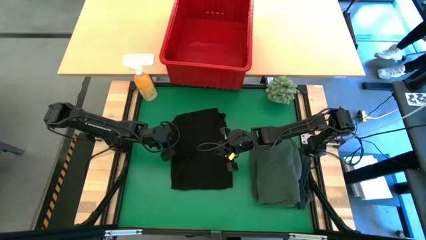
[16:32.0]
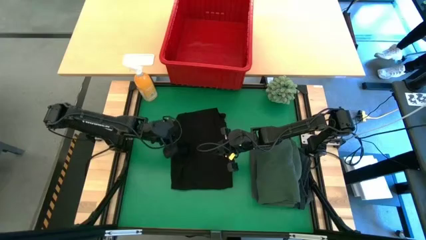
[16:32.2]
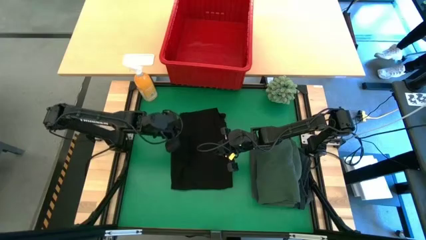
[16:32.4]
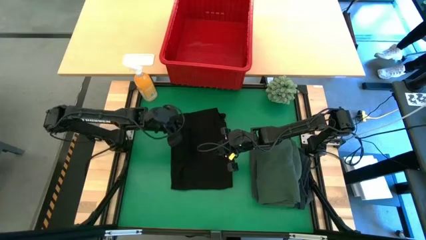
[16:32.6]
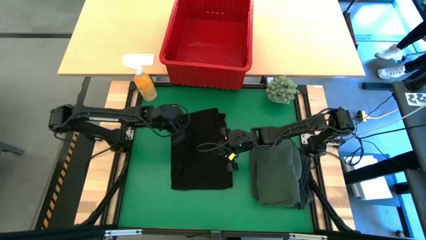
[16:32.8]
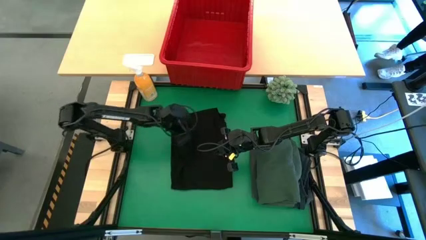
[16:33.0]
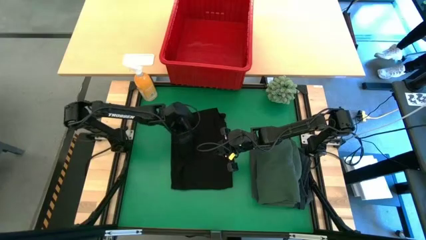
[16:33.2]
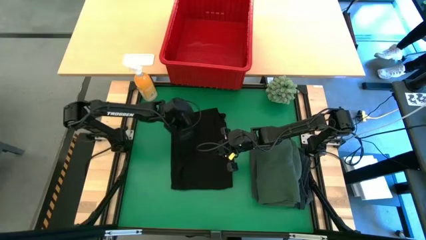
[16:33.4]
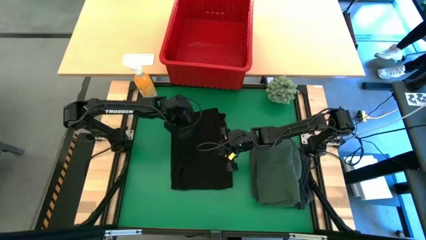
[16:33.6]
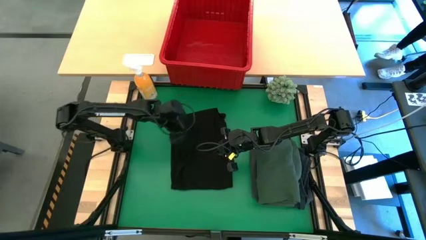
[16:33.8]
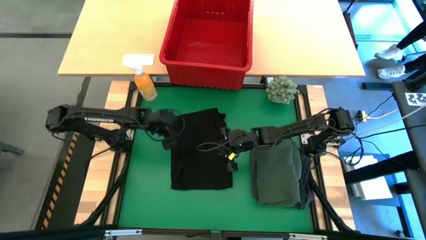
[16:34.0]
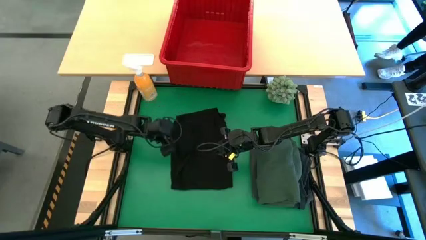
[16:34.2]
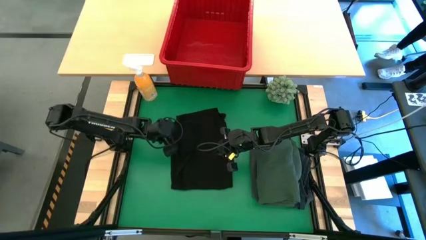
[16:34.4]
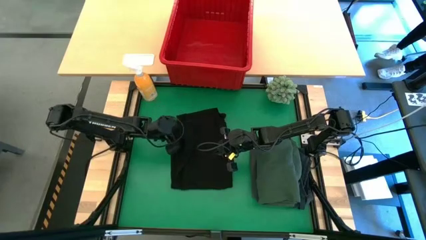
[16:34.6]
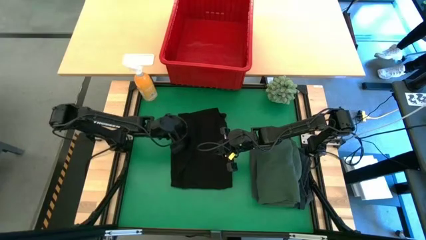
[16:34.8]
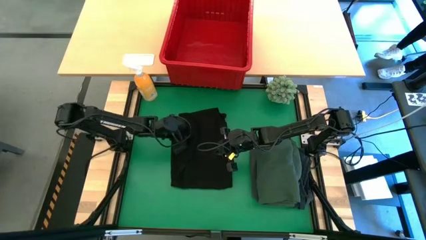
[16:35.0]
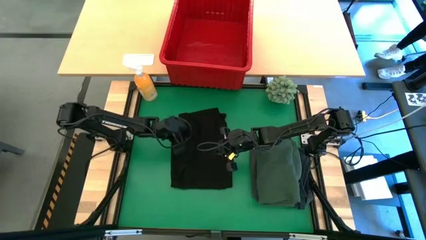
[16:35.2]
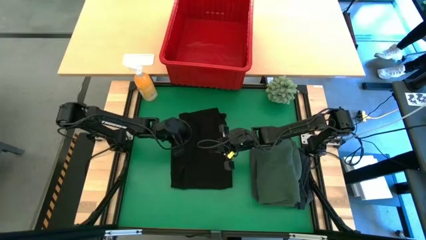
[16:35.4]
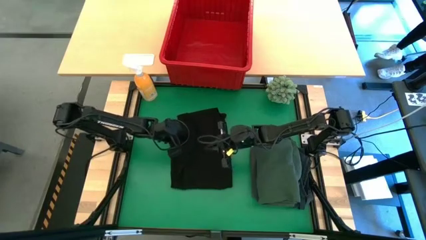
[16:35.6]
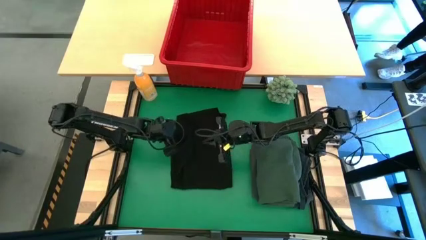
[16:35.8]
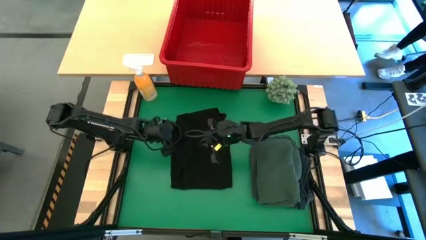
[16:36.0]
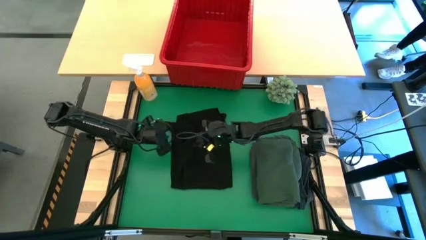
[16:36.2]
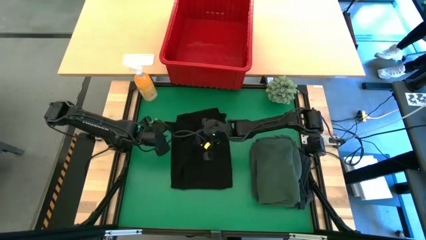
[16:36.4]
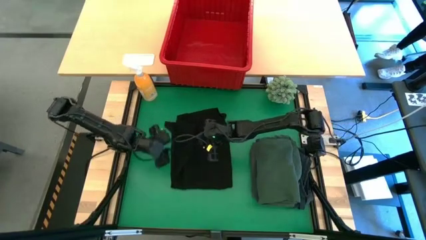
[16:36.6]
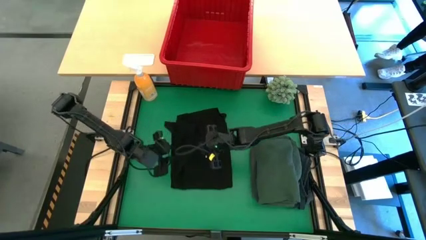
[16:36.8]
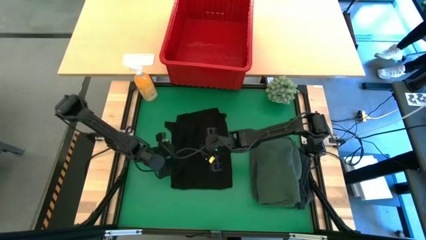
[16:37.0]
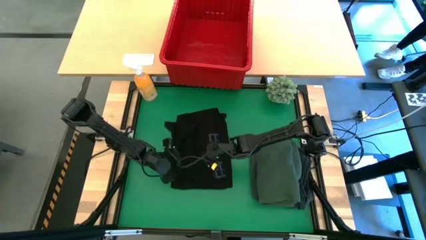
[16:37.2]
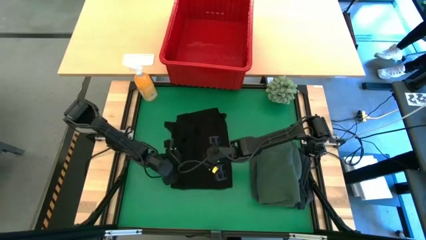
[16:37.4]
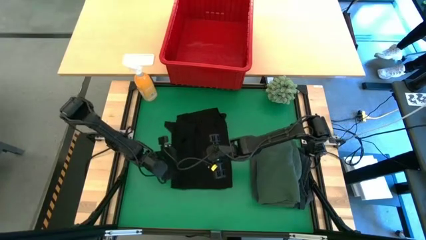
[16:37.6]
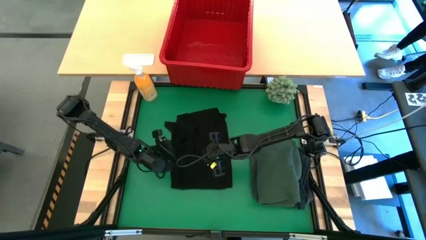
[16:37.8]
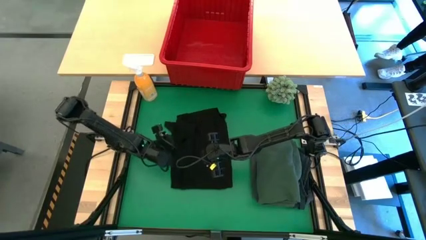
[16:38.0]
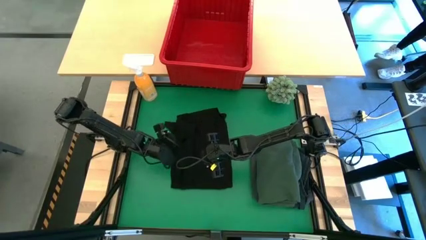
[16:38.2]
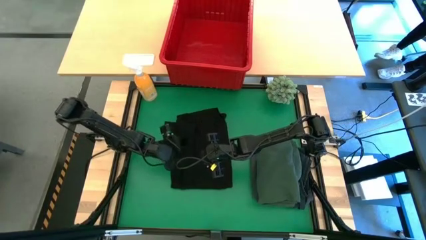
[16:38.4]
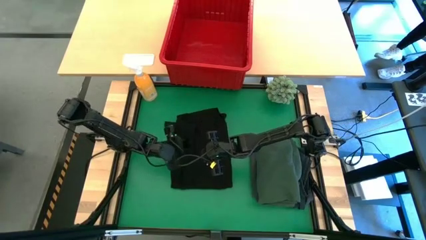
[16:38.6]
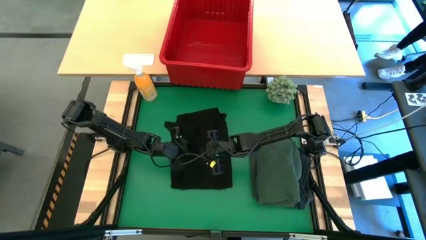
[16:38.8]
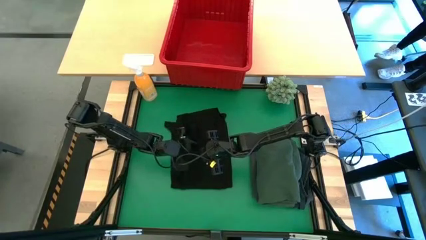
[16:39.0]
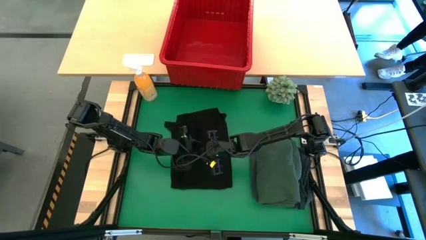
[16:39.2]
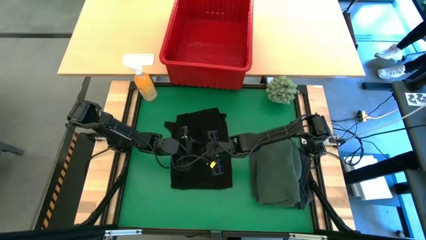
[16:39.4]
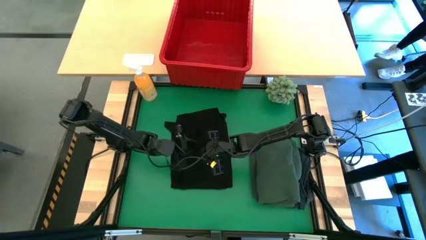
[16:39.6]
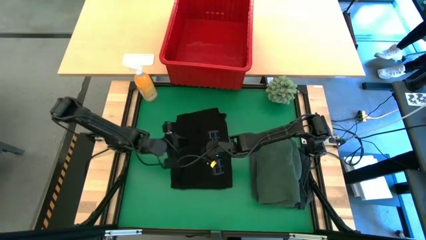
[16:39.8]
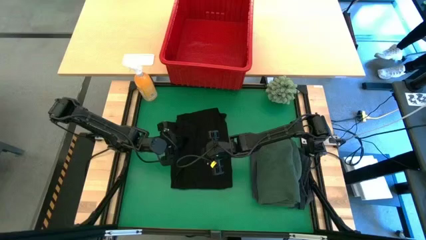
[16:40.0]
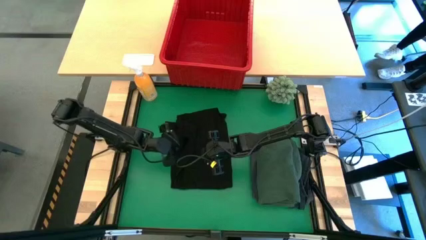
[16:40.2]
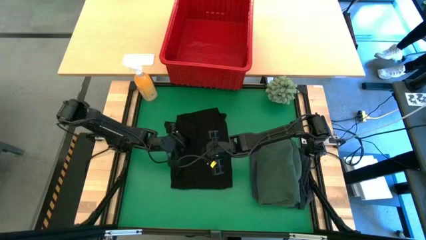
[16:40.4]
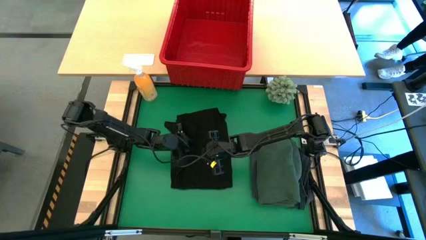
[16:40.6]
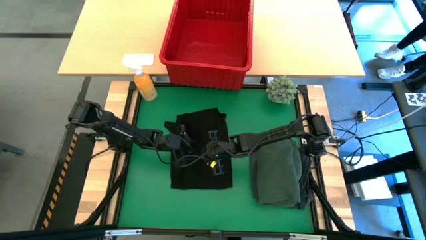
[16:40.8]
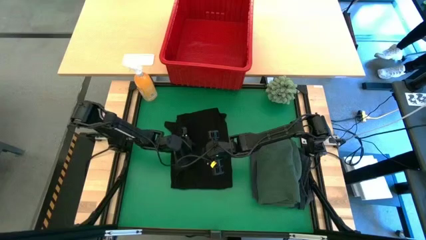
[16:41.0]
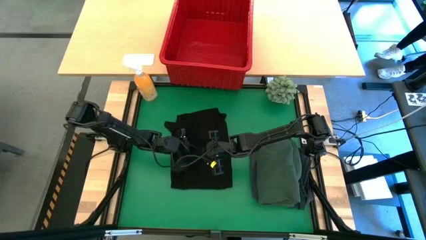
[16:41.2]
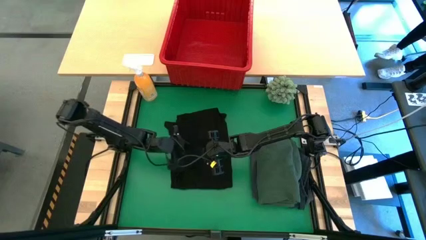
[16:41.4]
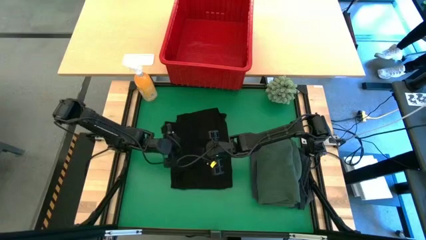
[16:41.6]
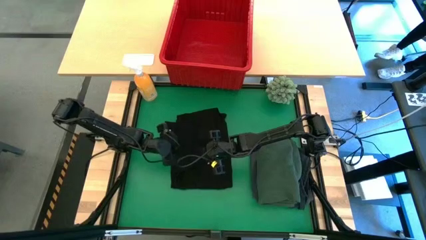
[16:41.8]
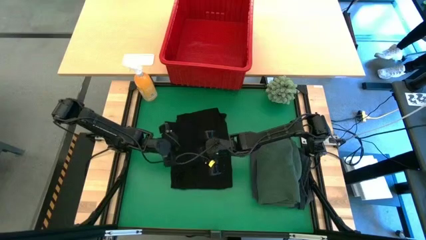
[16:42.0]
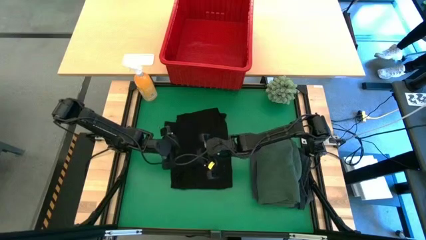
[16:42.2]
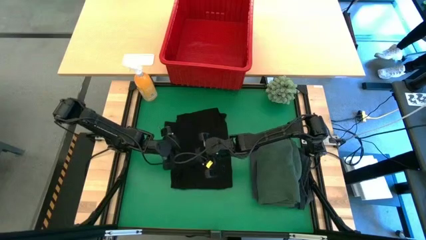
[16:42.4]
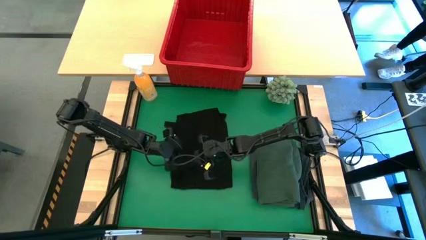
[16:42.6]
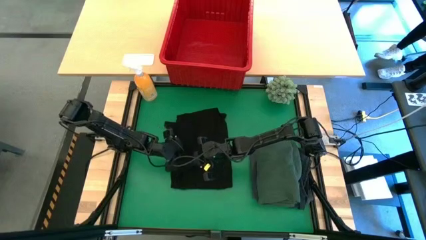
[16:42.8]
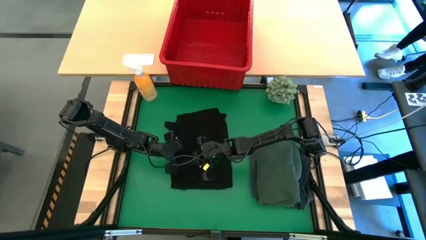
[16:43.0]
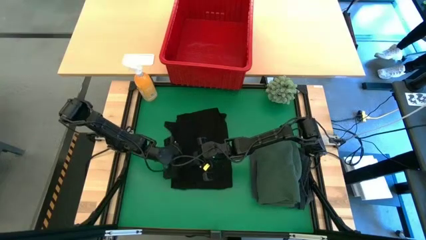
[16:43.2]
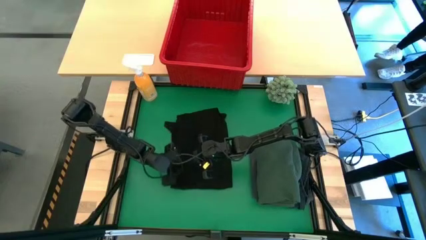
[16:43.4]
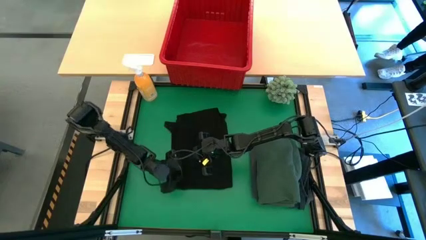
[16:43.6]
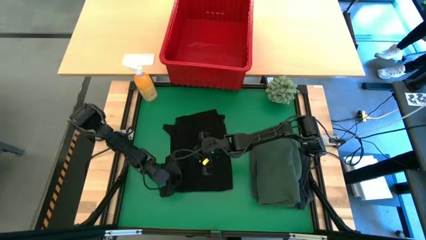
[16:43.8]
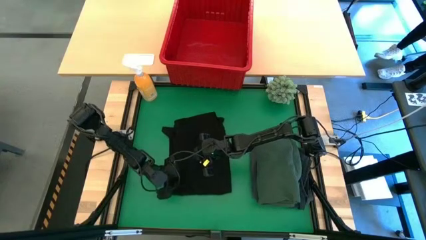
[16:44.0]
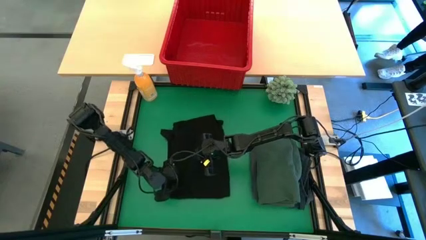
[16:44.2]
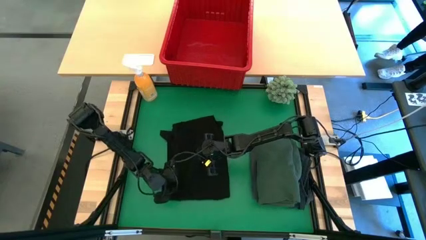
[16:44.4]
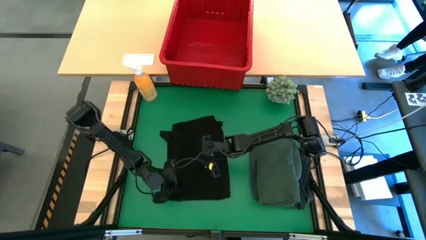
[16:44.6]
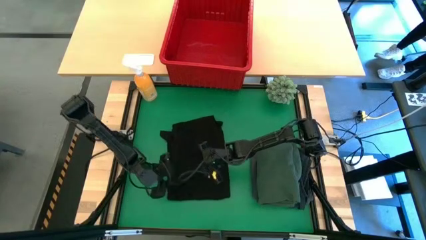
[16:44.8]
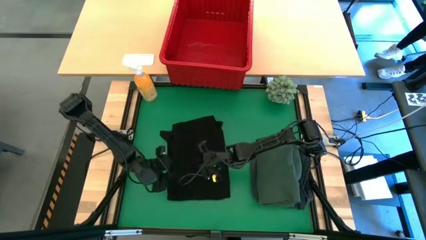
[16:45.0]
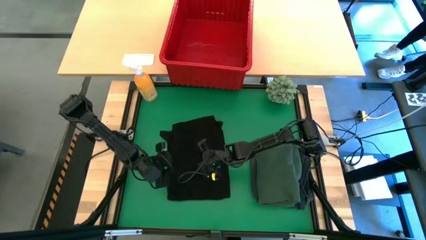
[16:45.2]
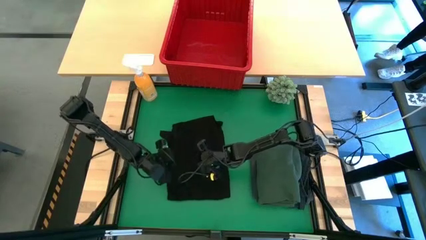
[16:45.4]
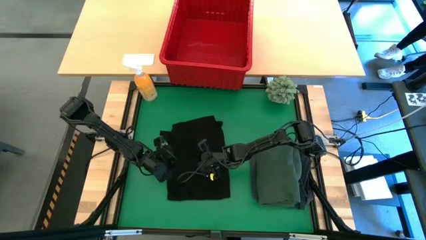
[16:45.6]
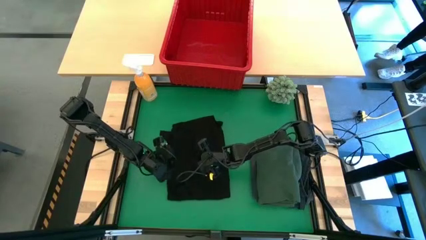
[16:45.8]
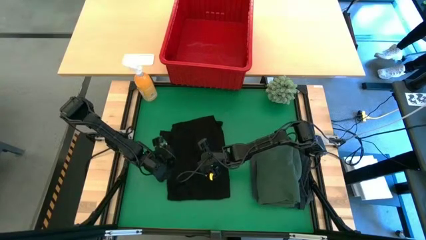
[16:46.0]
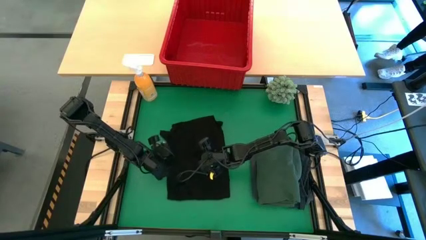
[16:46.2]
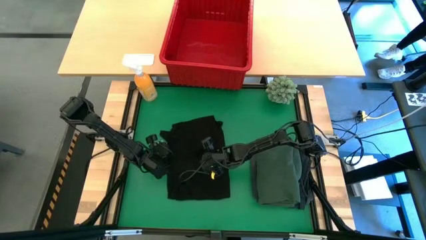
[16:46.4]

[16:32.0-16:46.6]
Task: Fold Laundry from Bin
Fold the black shirt

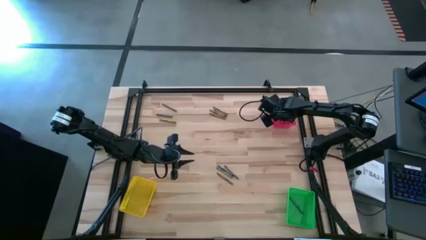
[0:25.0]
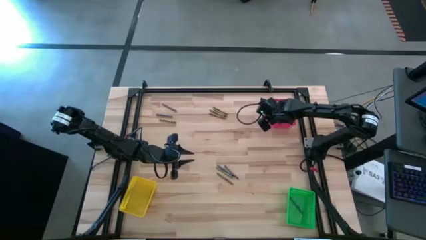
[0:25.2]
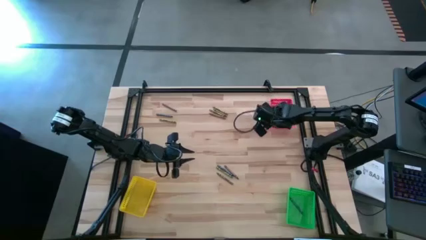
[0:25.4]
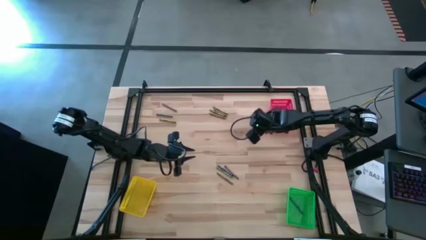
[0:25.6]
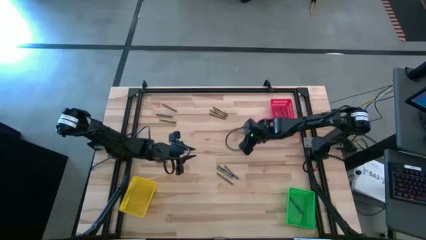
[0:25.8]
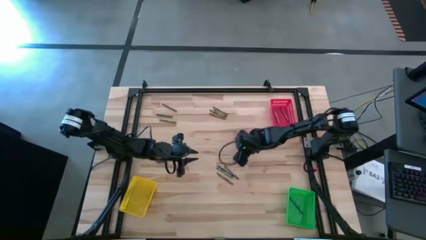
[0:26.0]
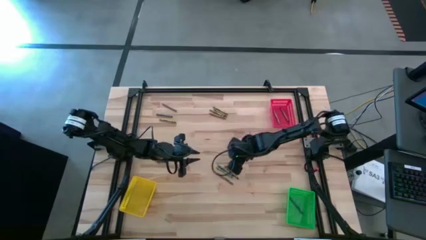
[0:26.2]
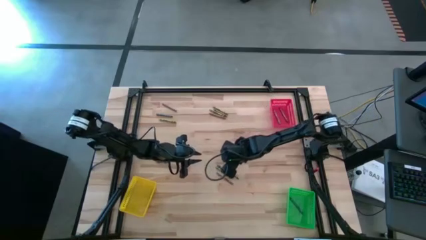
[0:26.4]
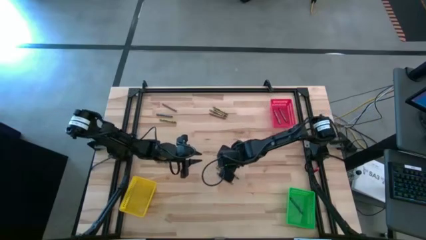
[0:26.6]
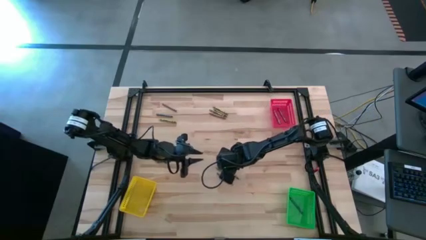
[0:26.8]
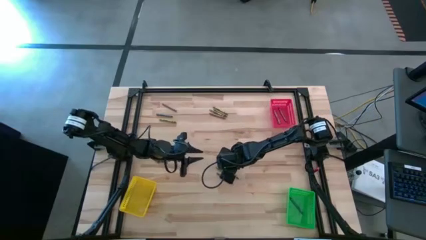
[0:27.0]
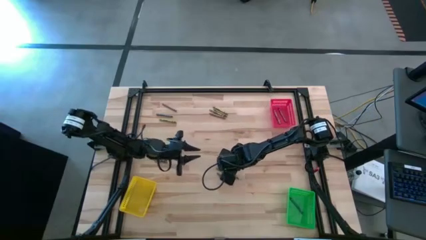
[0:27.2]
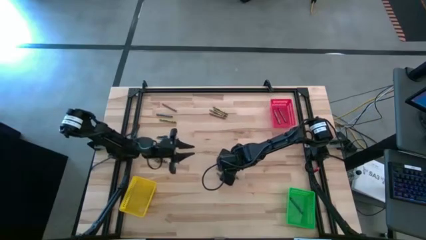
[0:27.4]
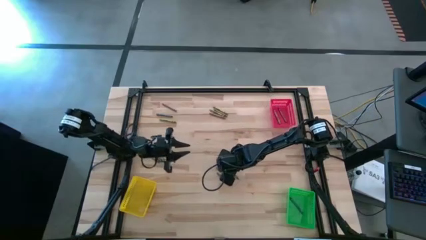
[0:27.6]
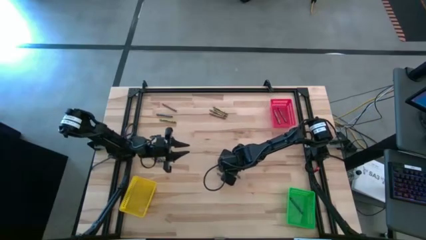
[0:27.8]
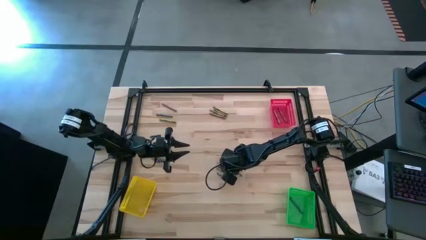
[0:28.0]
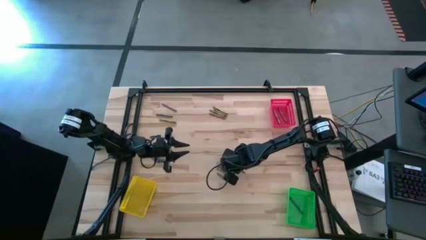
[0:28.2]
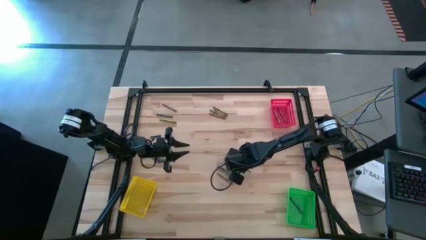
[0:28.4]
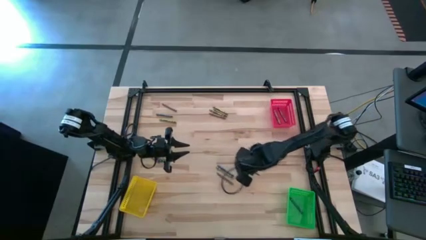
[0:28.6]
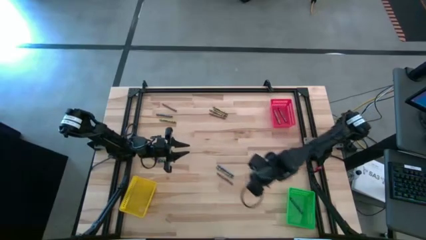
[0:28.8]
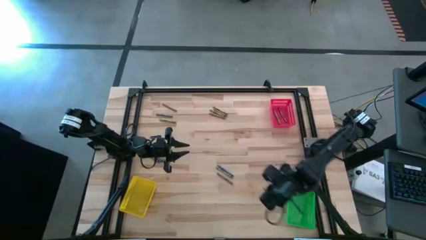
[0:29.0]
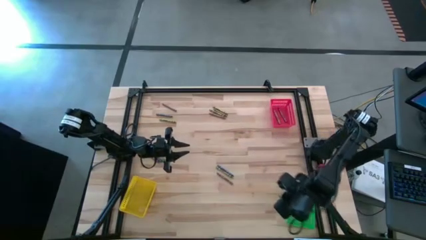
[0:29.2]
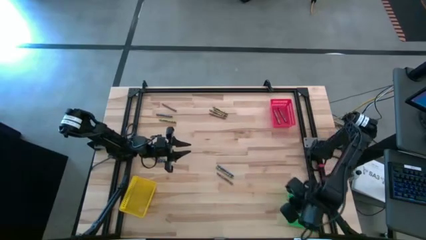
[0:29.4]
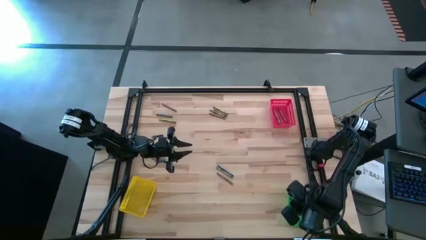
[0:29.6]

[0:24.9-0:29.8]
Task: Sort crayons
Put the brown crayon into the green bin
